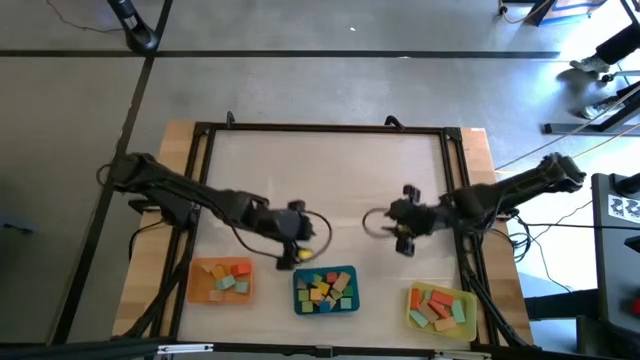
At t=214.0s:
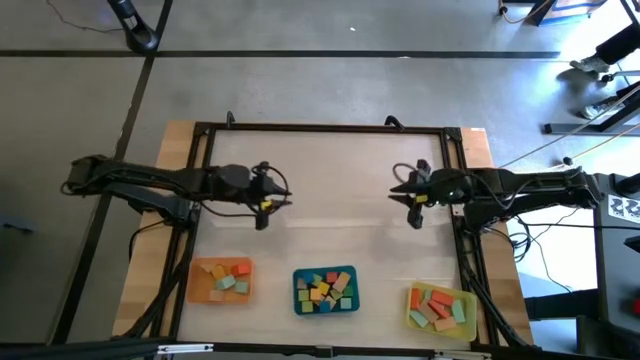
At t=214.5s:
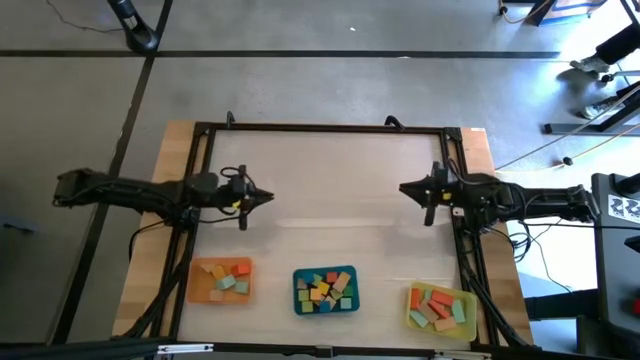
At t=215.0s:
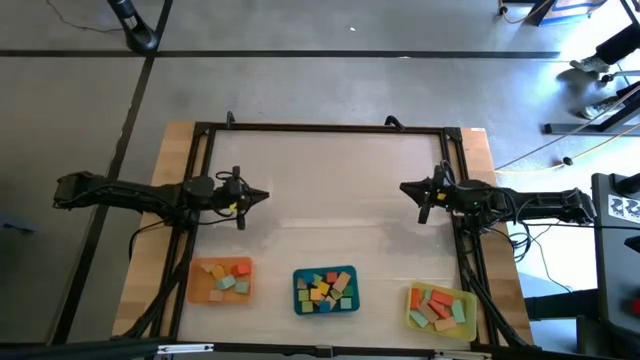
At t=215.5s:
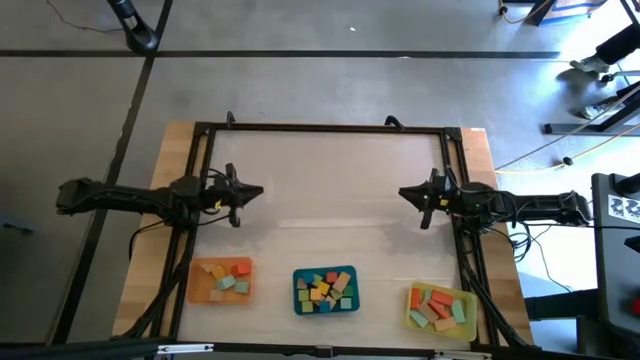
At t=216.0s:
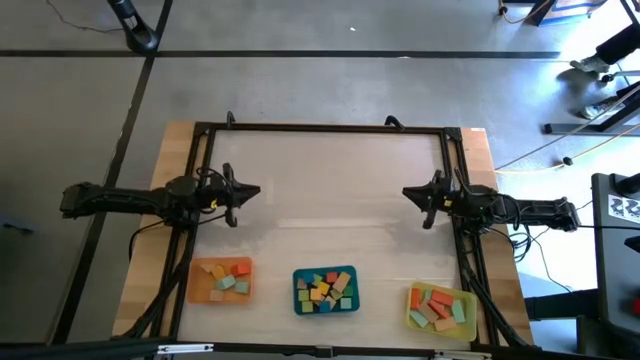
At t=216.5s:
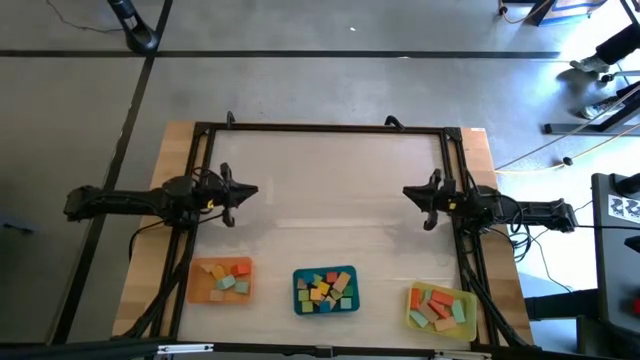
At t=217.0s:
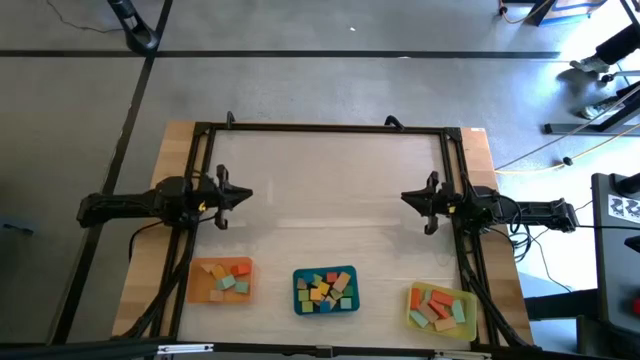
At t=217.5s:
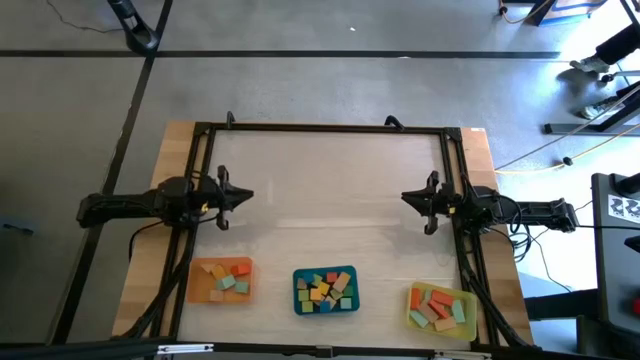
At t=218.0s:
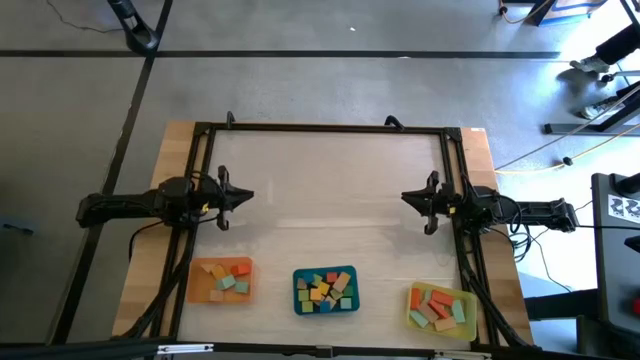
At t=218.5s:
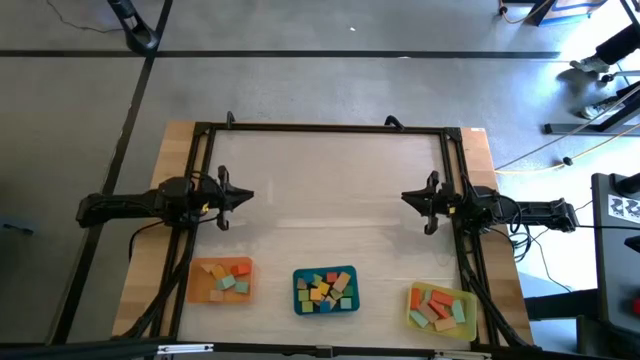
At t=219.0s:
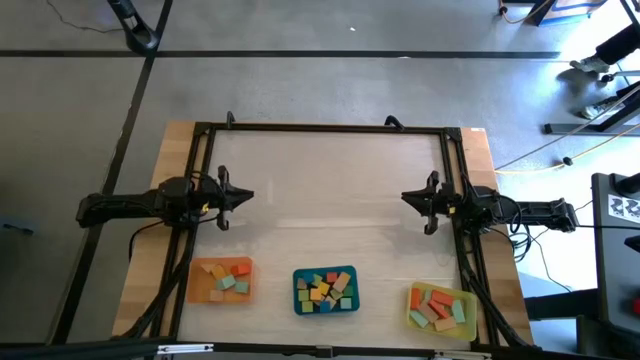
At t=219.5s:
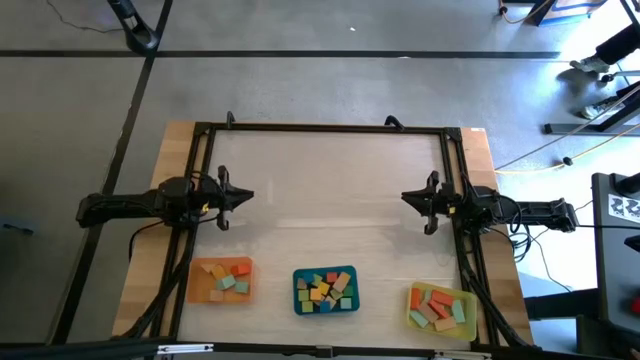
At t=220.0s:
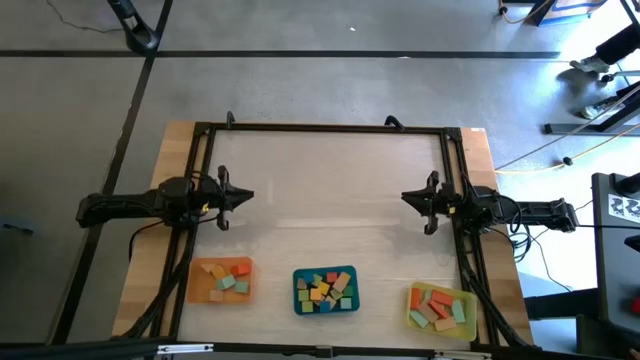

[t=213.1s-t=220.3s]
Task: Sort blocks by size
Return to Home Position

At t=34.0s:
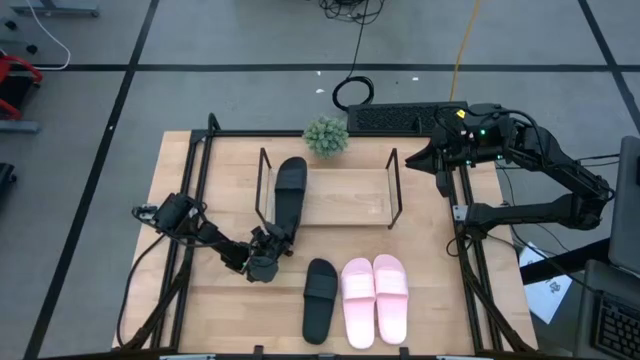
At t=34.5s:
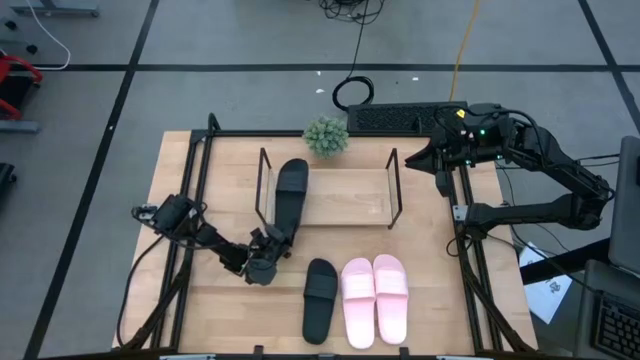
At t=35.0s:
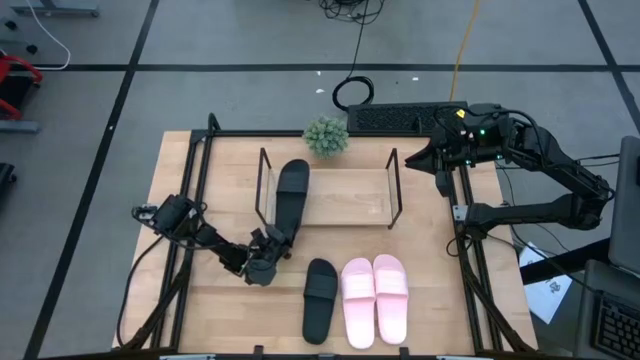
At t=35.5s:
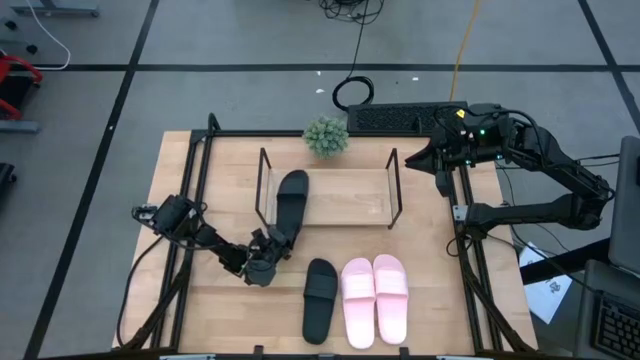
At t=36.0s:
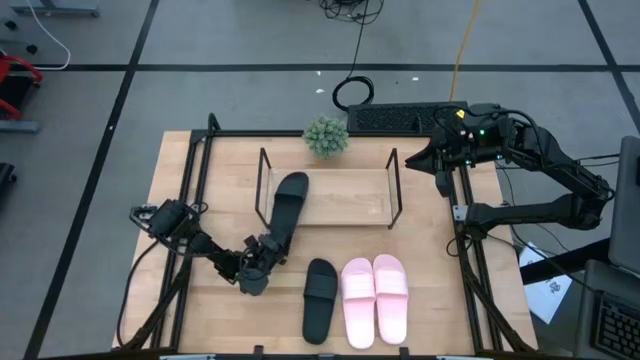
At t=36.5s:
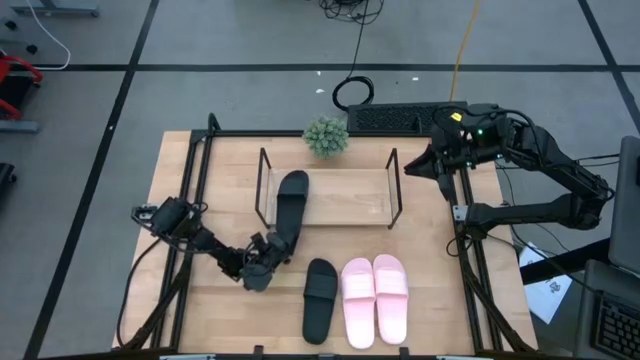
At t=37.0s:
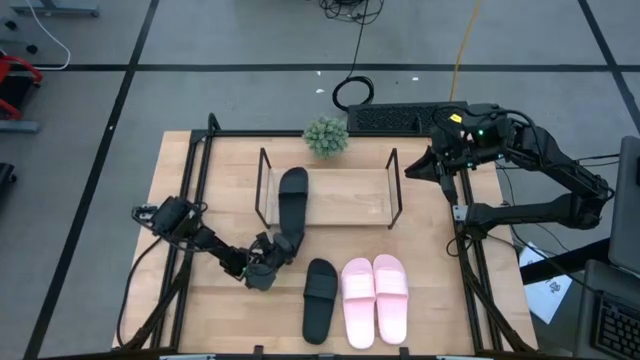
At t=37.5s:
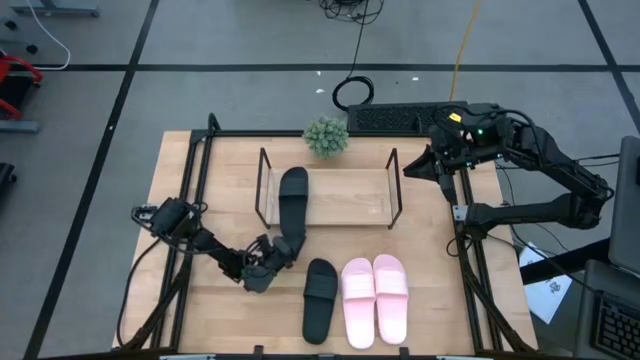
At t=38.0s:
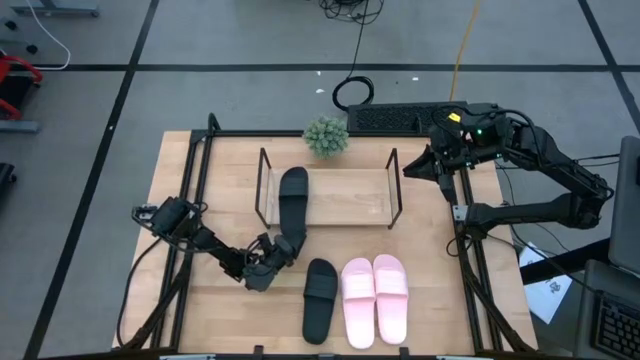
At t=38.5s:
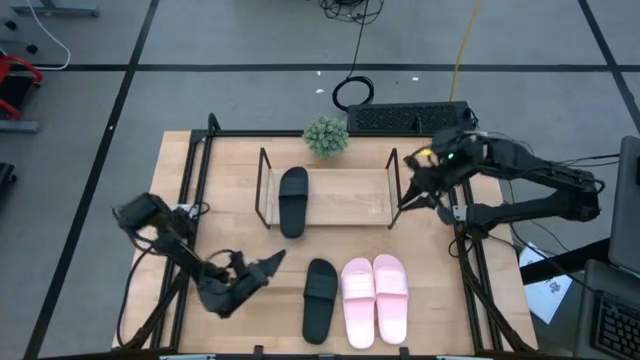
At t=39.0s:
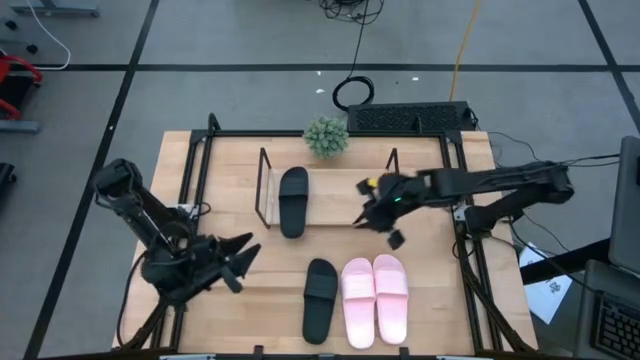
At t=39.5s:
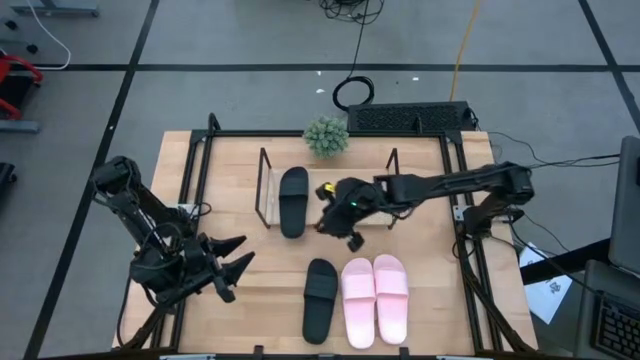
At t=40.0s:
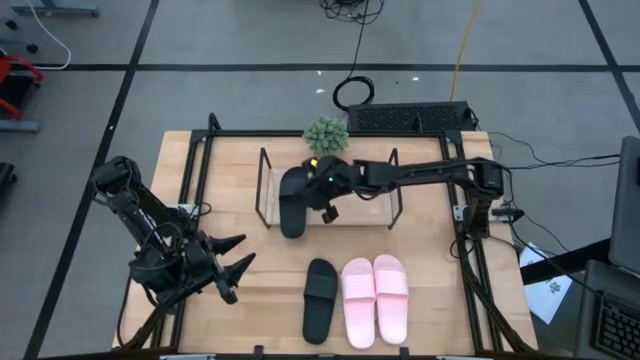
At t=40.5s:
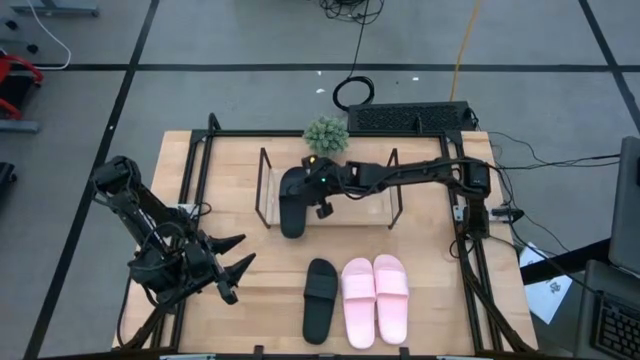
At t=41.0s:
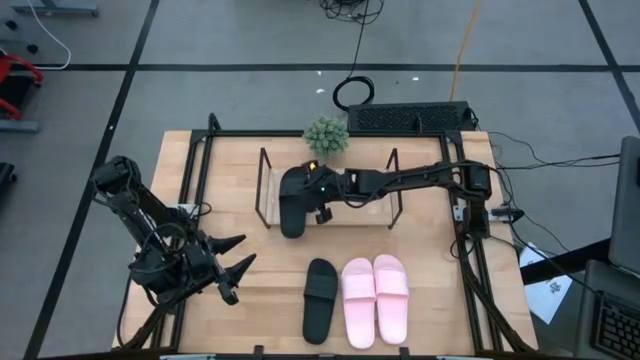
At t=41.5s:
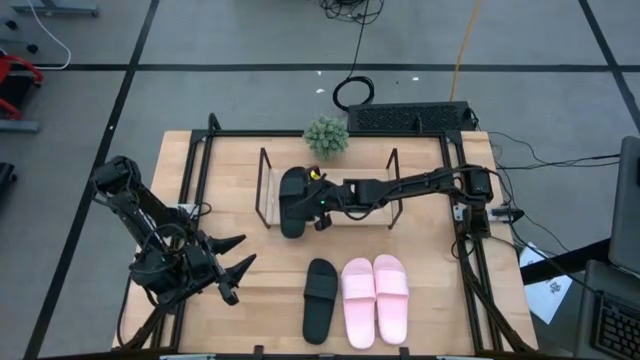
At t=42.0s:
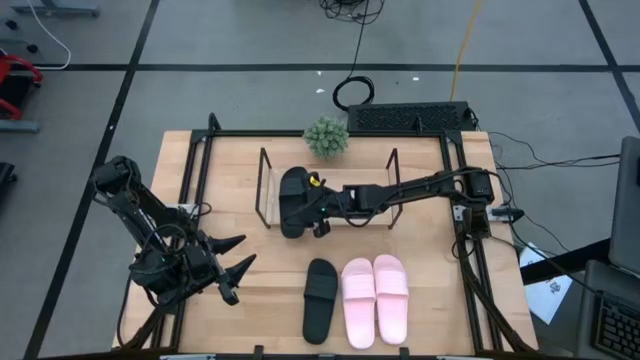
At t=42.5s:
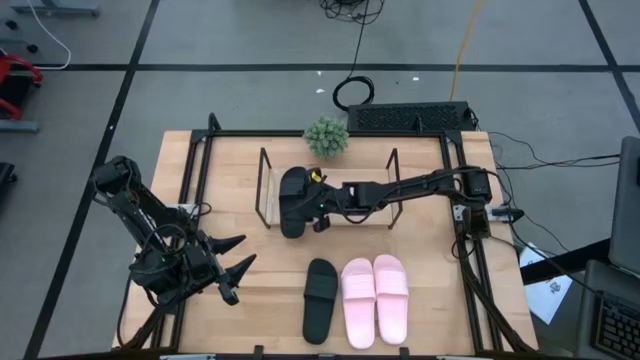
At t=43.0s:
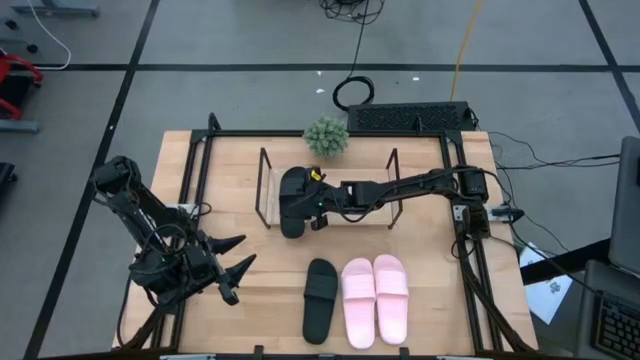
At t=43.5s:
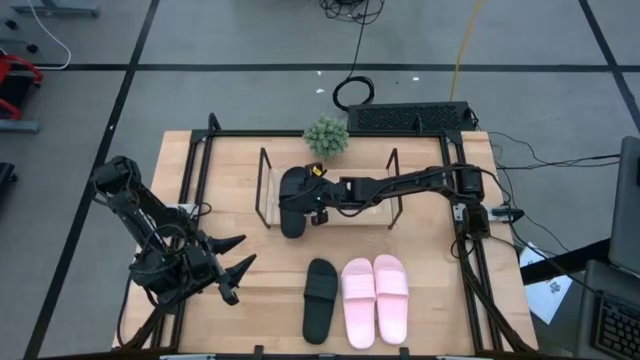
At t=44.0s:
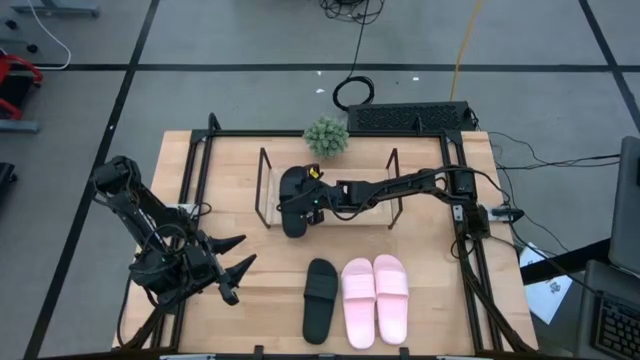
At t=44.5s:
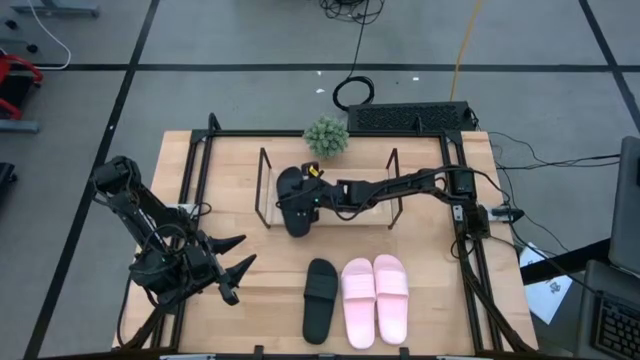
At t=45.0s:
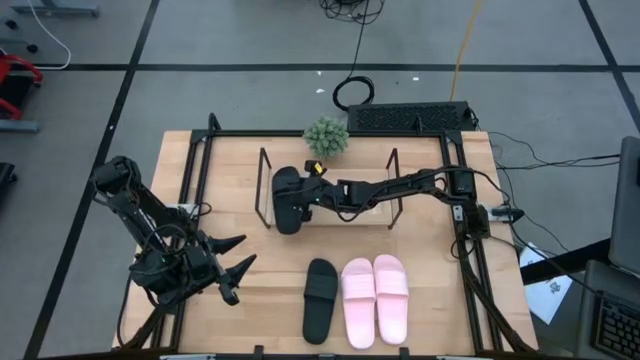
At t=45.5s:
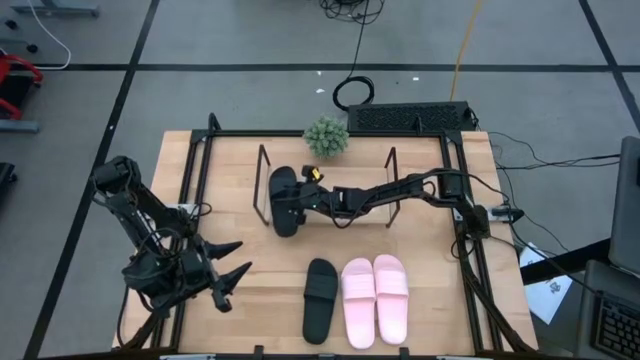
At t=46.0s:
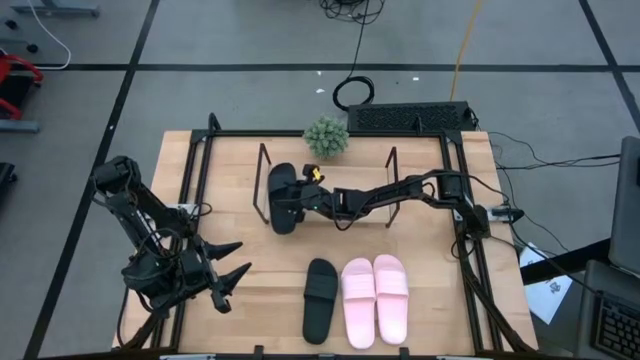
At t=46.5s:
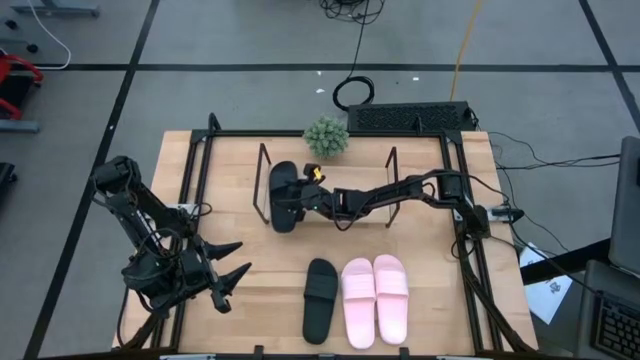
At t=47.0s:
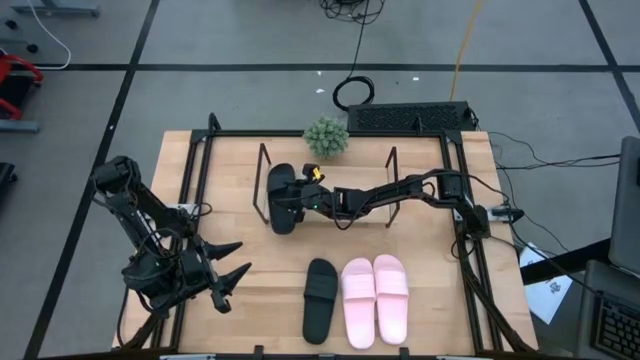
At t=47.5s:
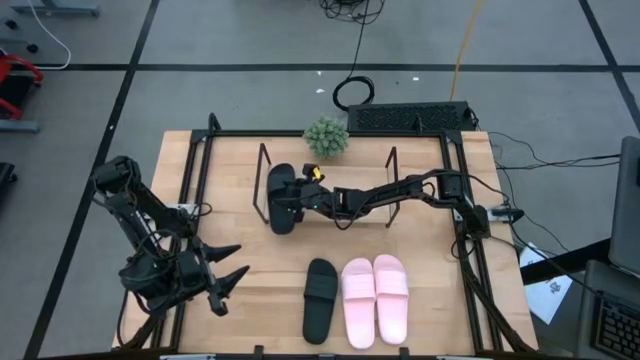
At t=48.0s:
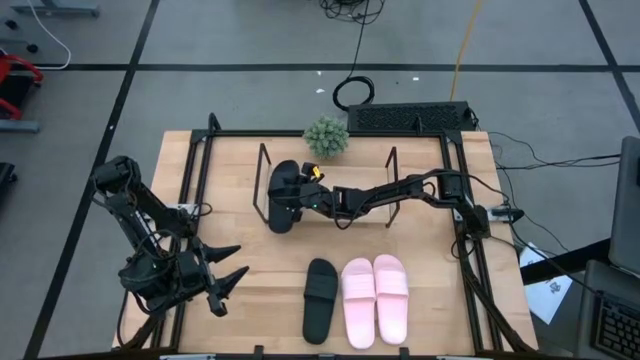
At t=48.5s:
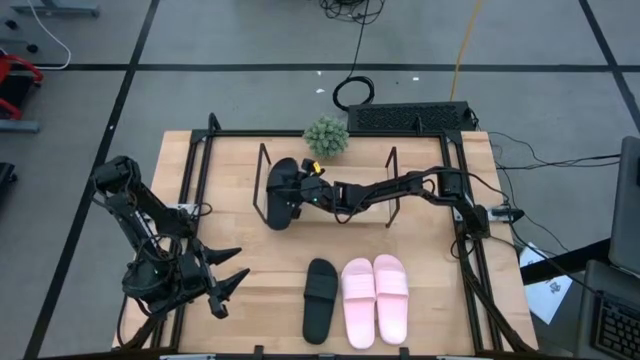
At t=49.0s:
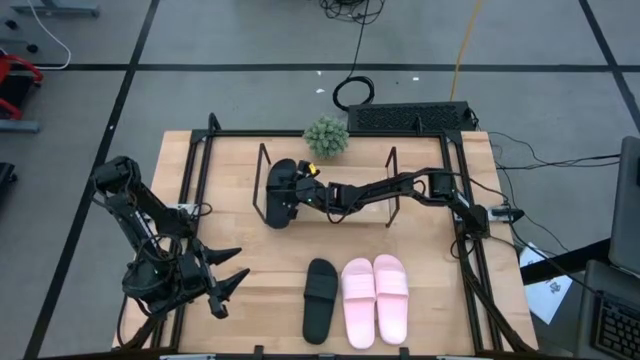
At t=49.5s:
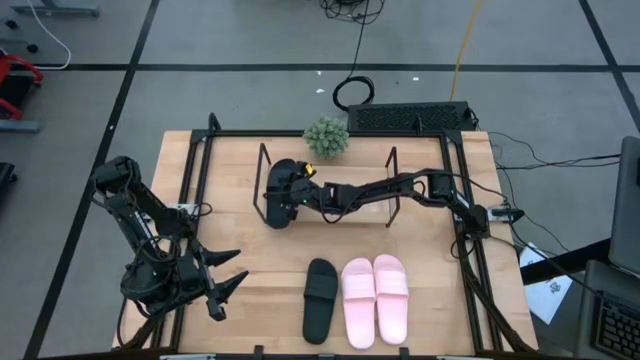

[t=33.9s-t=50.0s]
Task: Pick and place slides into the shelf
Put the left black slides on the shelf
